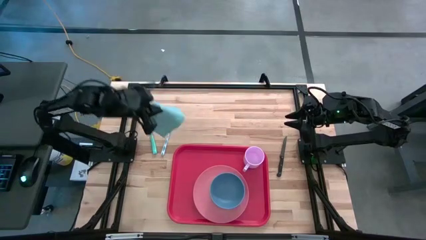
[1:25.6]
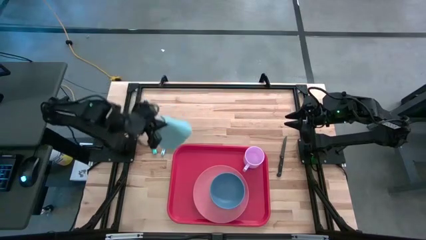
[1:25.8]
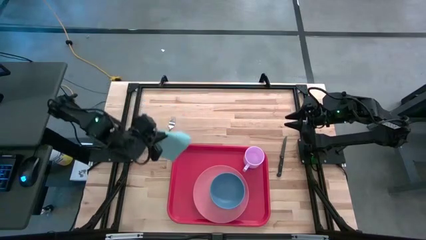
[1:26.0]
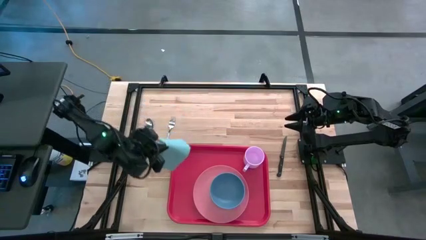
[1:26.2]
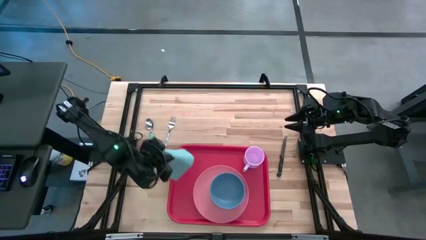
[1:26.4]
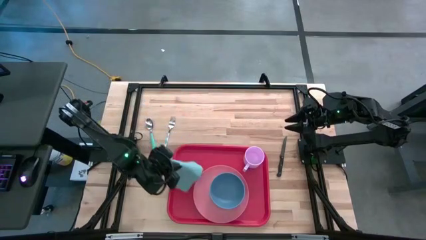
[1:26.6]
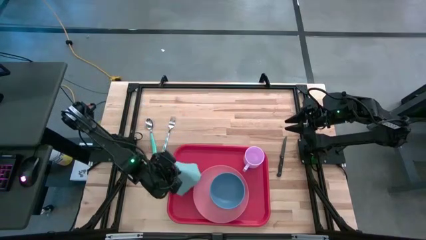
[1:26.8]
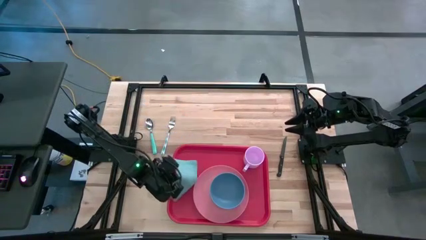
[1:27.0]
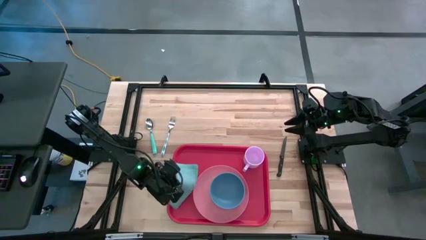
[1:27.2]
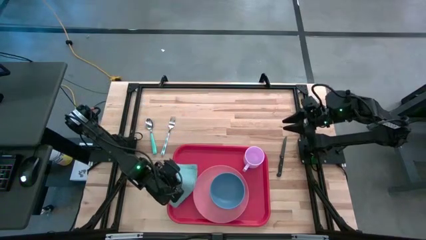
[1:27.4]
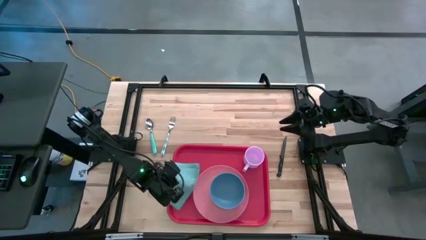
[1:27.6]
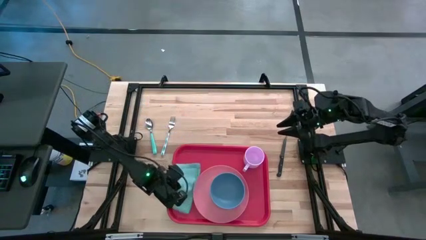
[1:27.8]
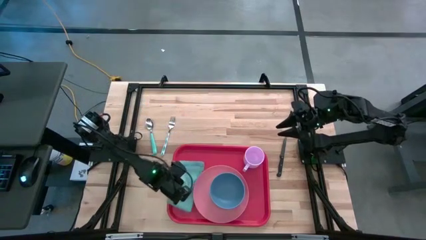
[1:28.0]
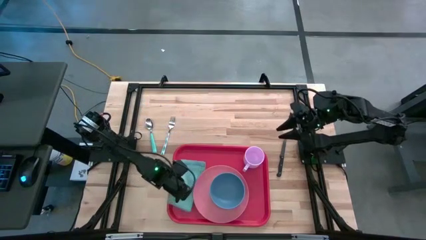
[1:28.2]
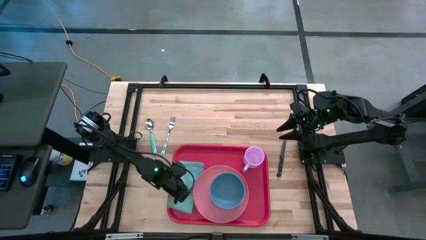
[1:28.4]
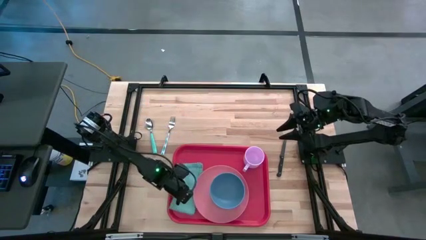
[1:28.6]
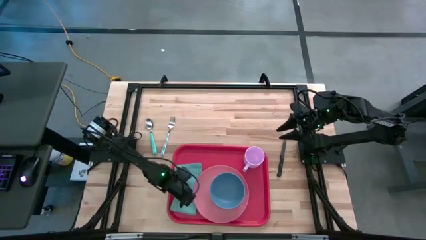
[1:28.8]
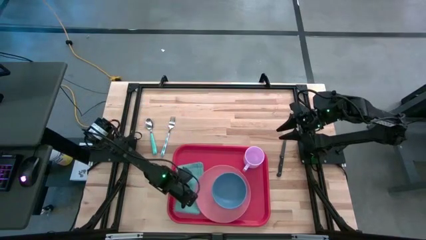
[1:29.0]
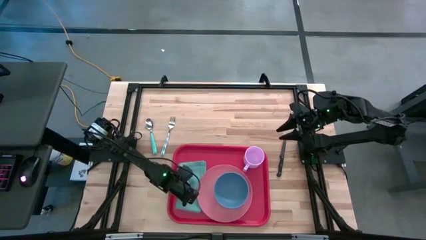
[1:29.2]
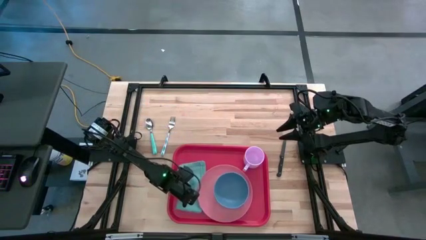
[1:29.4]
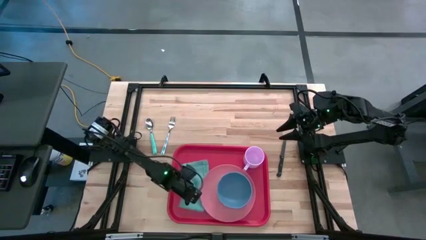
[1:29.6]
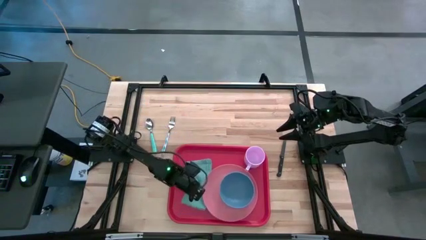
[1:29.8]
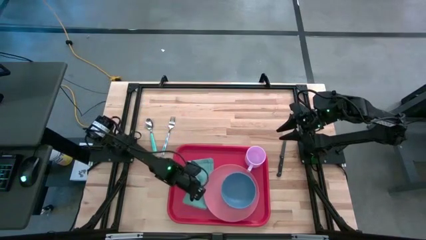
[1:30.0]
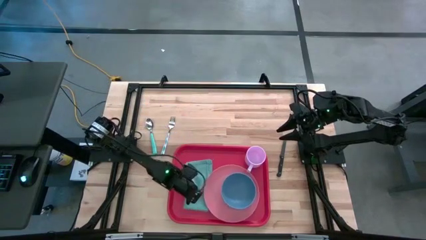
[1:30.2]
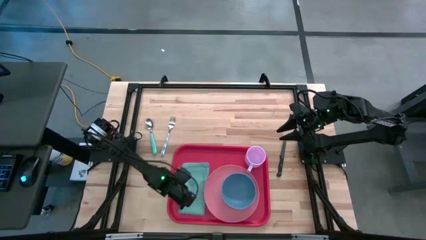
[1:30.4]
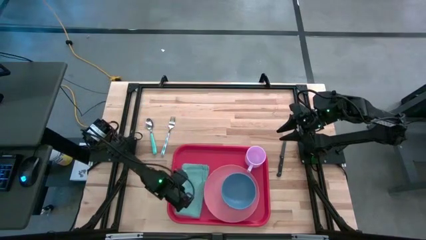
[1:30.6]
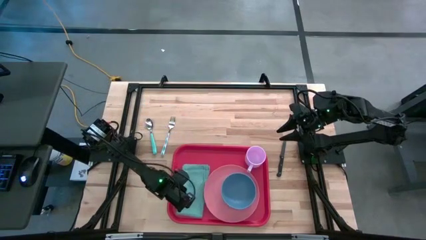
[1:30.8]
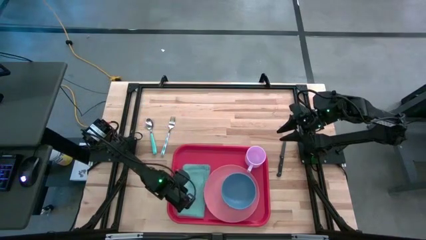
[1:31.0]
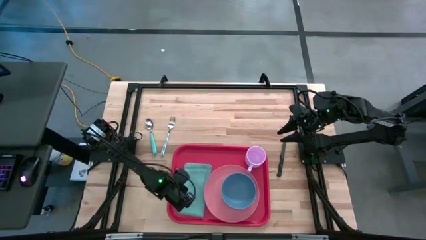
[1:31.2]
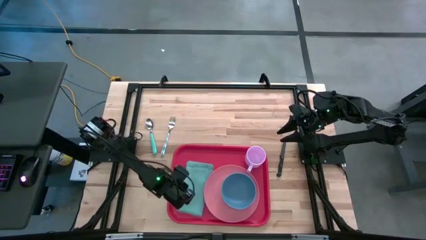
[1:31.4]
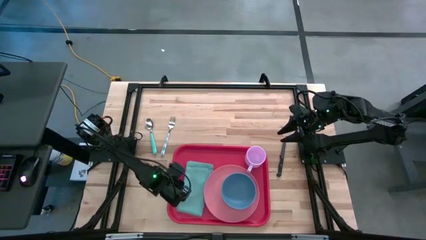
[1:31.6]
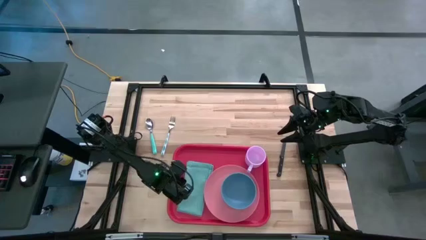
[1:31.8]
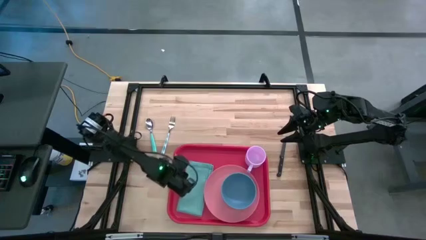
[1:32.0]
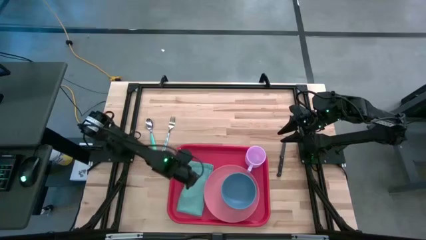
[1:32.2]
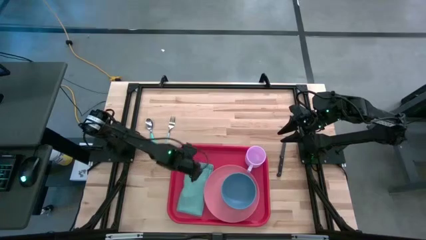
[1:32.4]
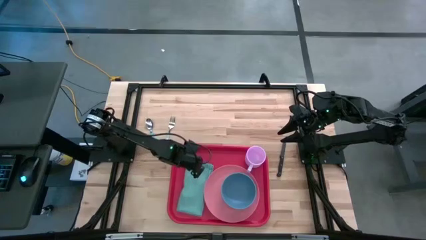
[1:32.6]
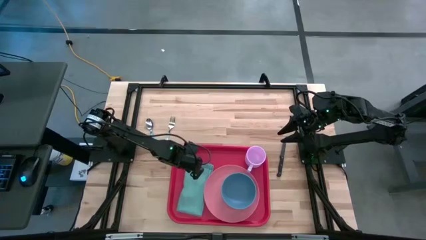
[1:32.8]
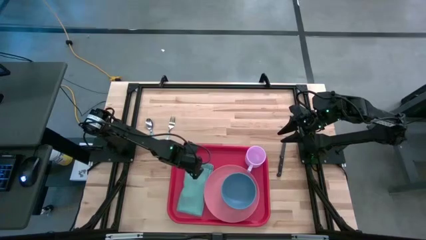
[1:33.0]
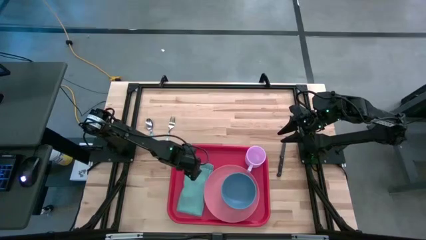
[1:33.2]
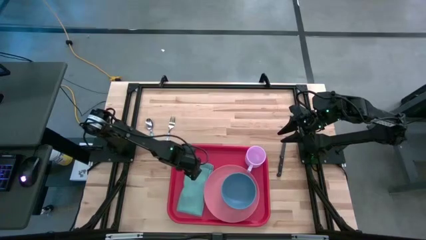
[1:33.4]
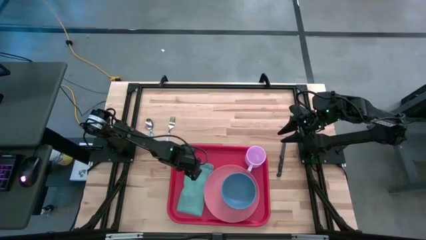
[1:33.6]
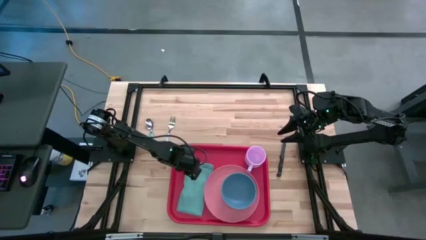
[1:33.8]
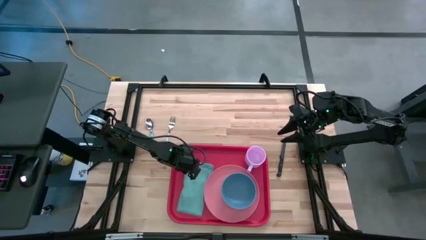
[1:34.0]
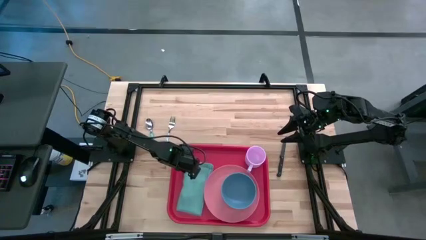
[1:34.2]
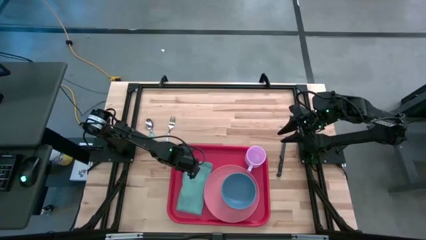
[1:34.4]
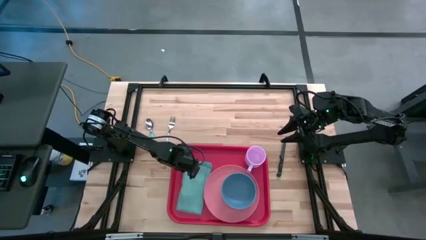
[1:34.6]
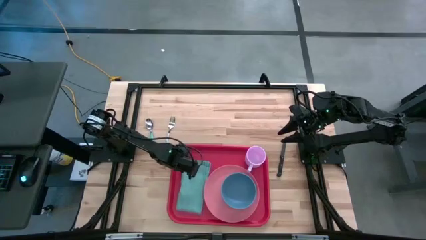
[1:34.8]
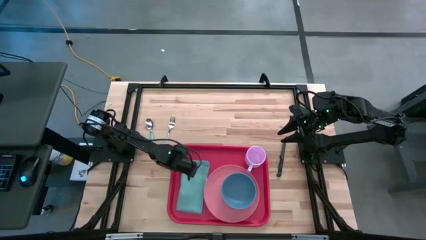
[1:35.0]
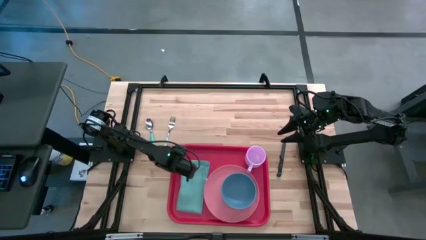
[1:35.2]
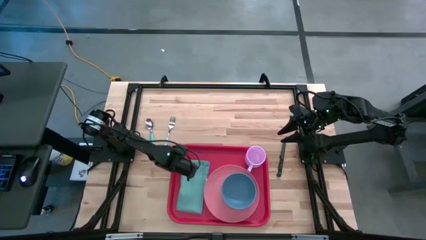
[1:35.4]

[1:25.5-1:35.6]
Task: Set up tray
Put the blue napkin on the tray to the left of the pink plate

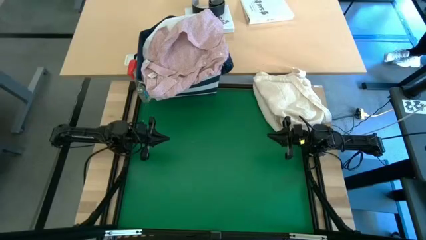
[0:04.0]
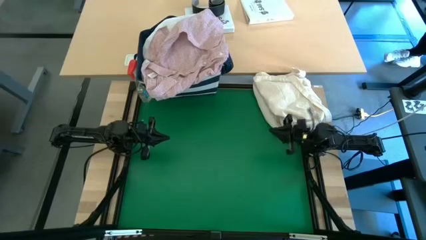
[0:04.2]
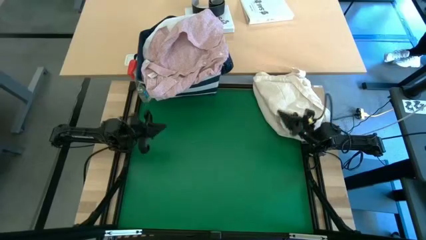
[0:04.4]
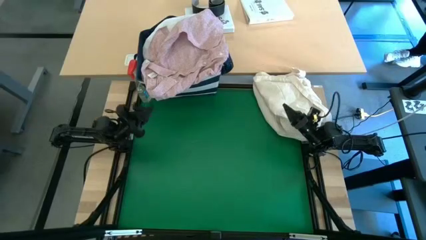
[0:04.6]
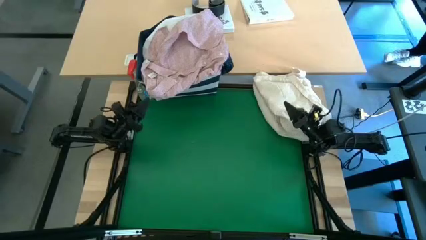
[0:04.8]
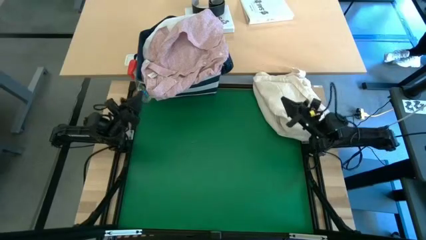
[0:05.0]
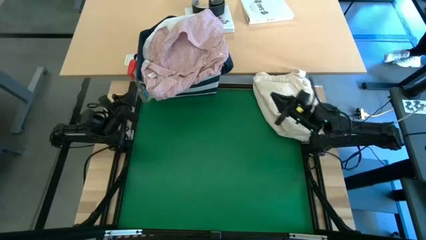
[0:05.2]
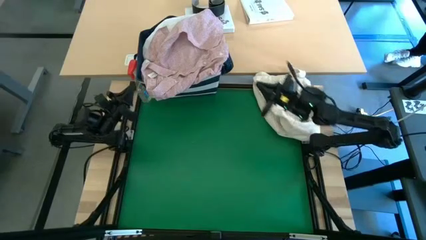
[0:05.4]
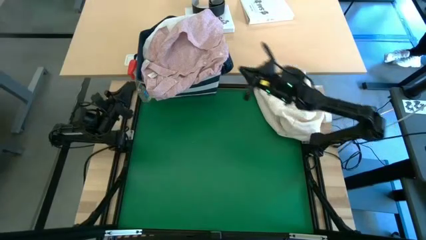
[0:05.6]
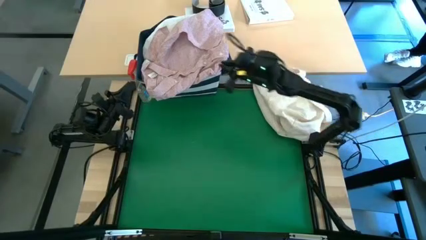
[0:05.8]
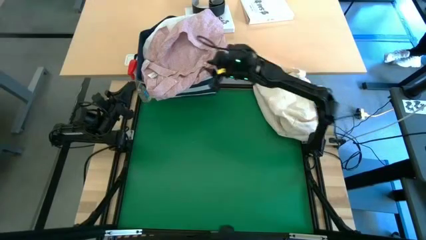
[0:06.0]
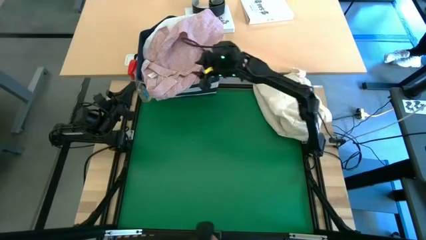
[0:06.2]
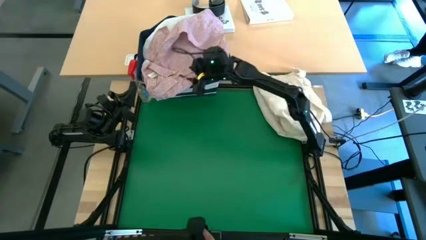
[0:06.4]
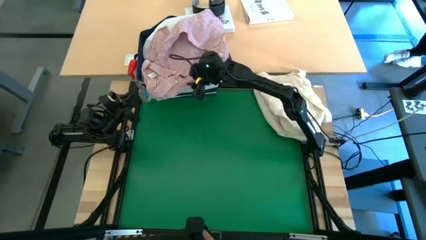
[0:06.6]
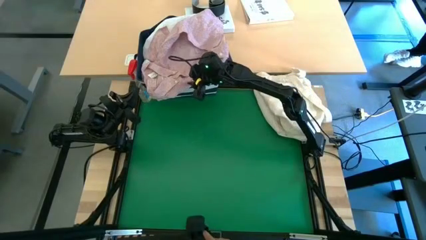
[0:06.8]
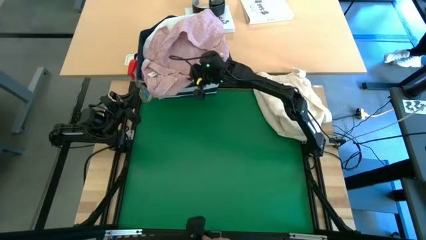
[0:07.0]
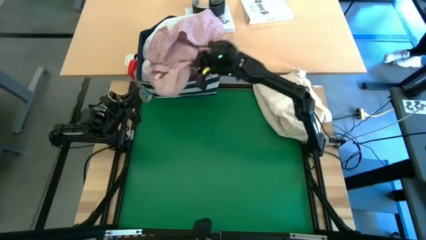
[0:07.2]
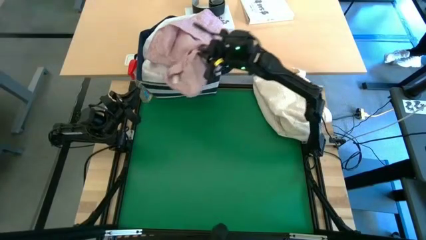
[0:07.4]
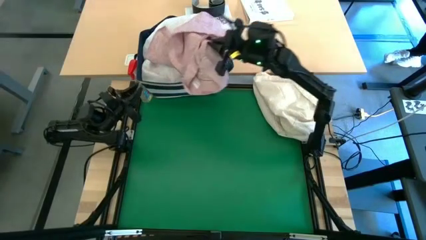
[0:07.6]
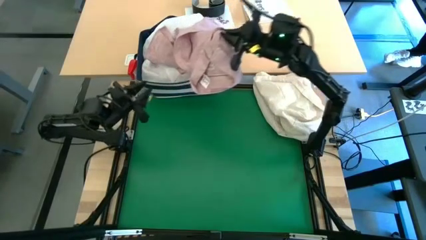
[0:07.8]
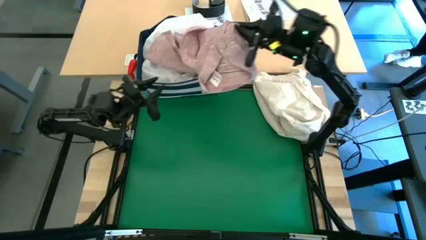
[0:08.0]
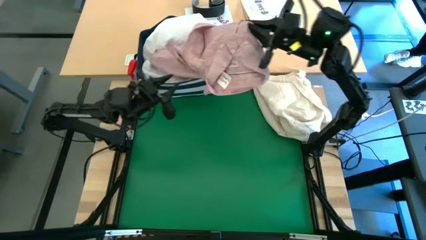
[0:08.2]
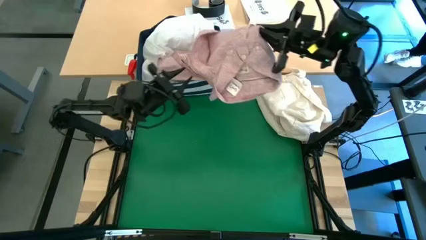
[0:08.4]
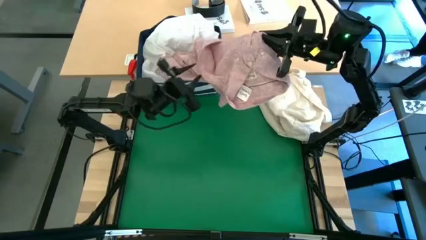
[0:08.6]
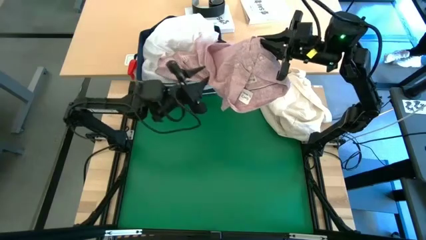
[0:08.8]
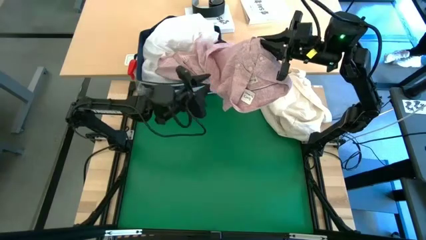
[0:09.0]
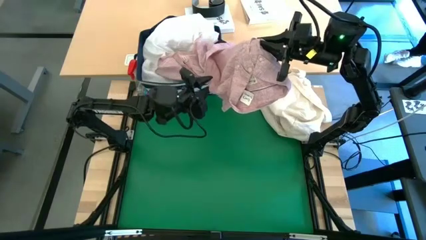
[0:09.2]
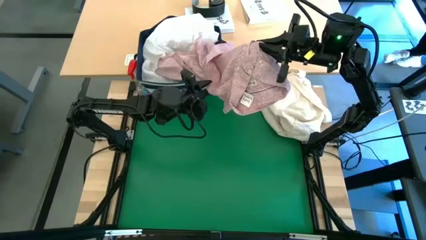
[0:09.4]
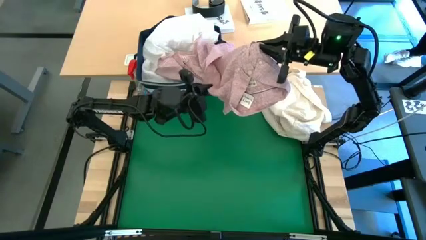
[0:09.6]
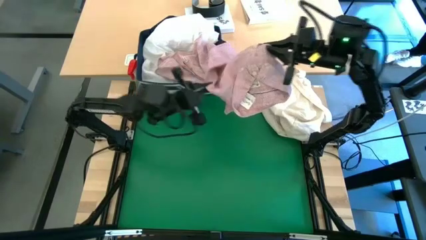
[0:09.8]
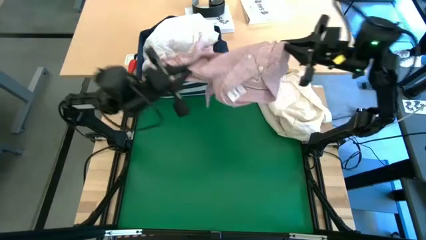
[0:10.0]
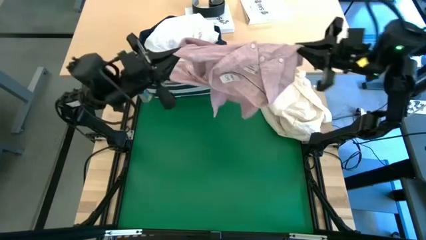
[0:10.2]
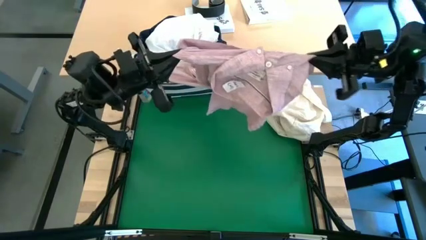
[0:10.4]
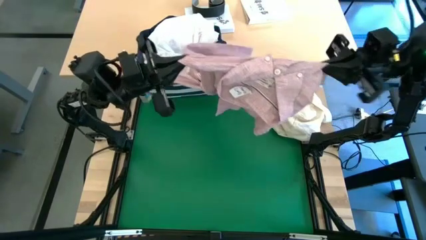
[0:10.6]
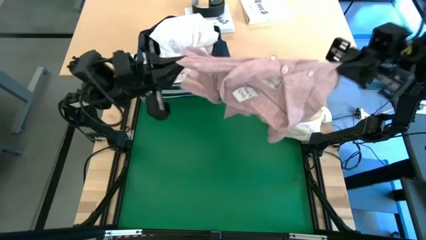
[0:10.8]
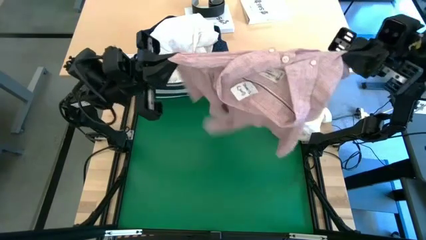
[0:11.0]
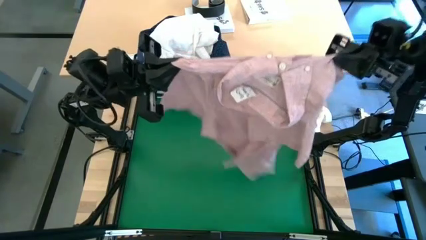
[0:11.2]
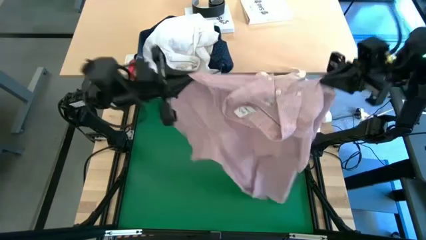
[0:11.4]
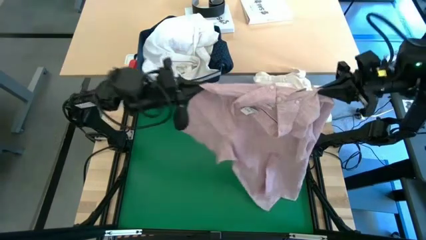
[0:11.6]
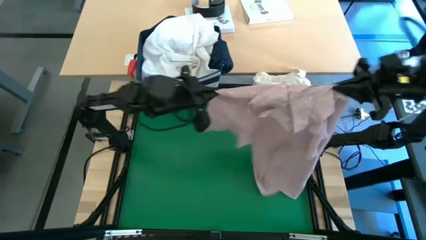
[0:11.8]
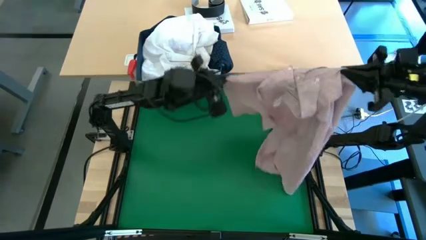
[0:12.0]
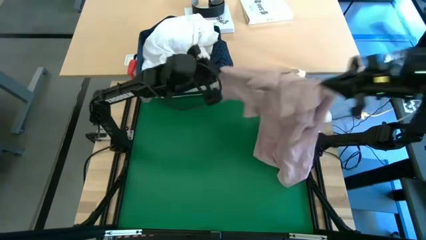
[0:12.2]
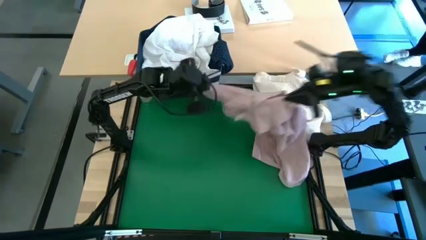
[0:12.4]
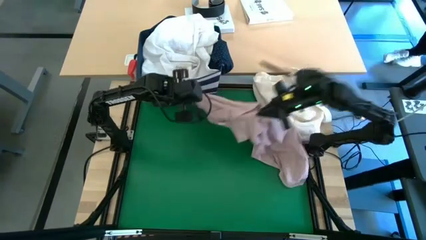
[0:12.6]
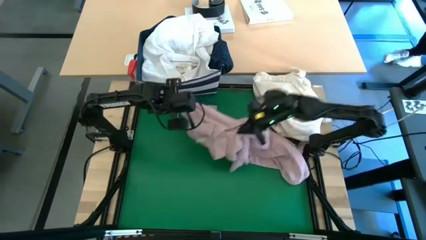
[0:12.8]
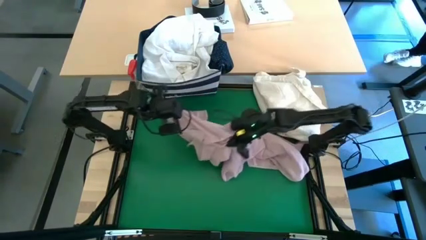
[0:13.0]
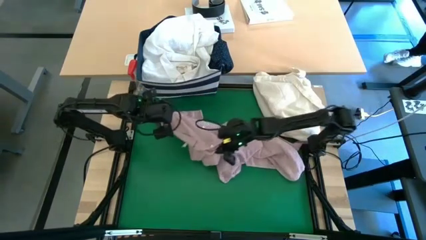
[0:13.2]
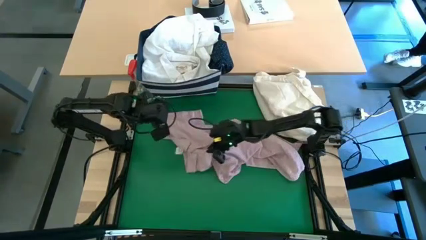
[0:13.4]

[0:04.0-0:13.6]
Task: Fold laundry
Remove the red polo from the blue laundry bin
